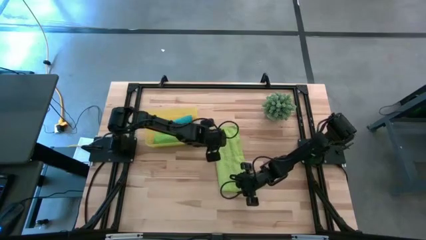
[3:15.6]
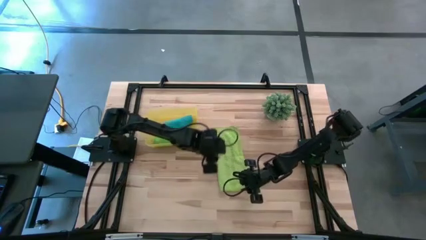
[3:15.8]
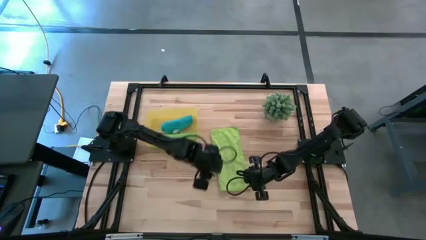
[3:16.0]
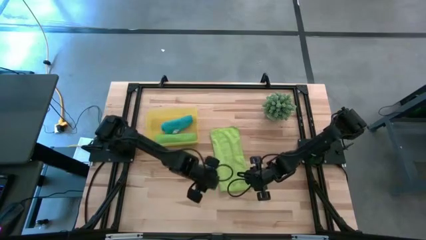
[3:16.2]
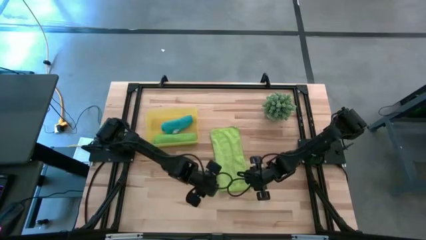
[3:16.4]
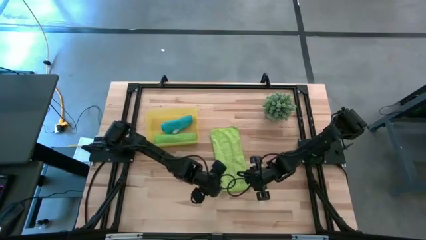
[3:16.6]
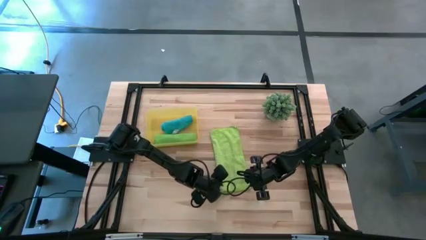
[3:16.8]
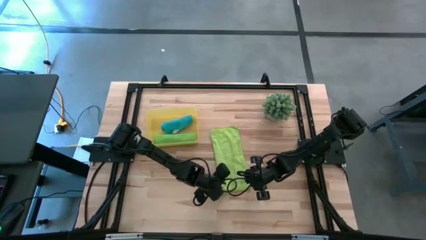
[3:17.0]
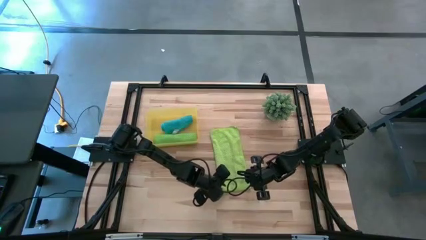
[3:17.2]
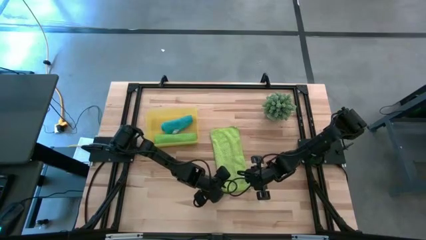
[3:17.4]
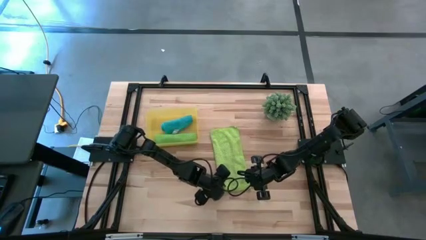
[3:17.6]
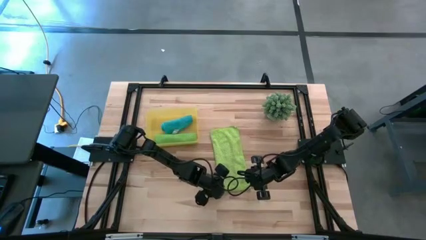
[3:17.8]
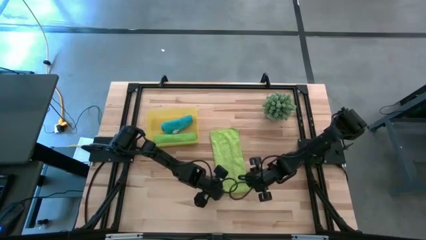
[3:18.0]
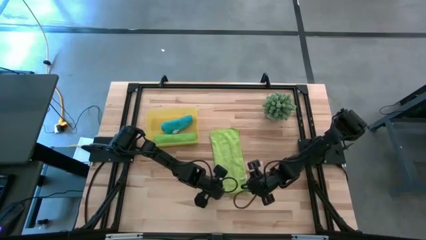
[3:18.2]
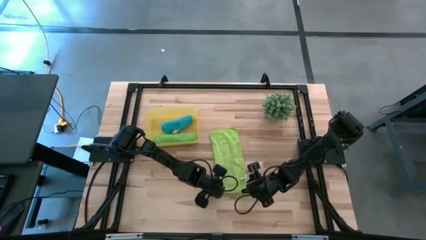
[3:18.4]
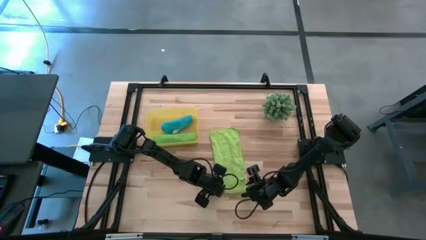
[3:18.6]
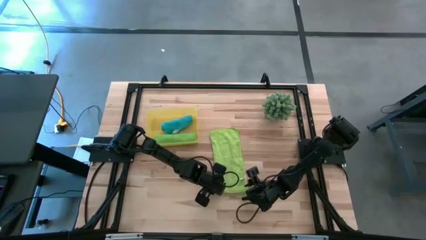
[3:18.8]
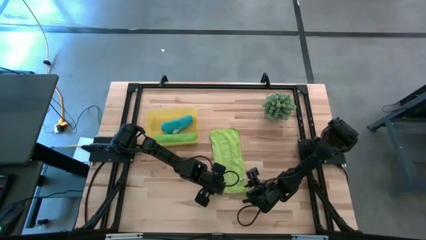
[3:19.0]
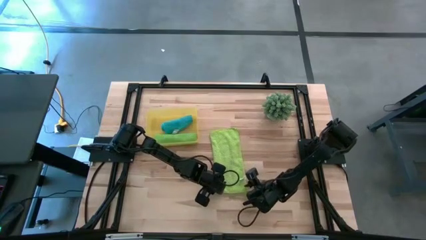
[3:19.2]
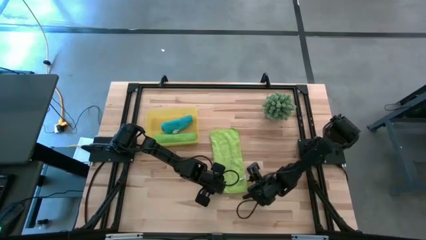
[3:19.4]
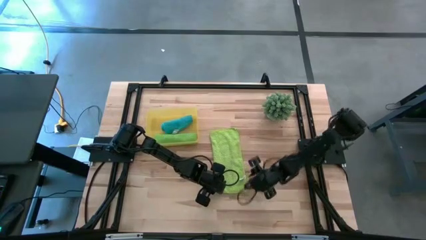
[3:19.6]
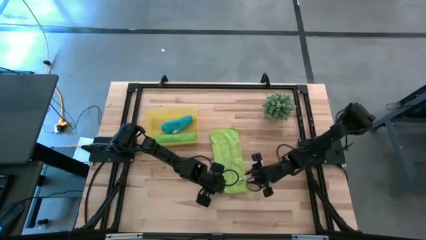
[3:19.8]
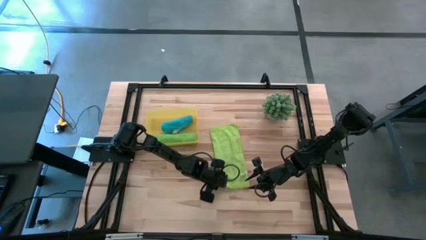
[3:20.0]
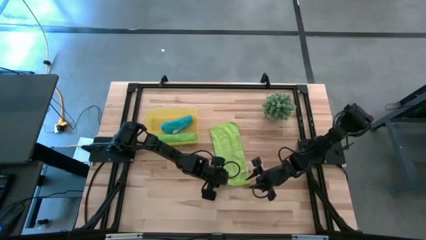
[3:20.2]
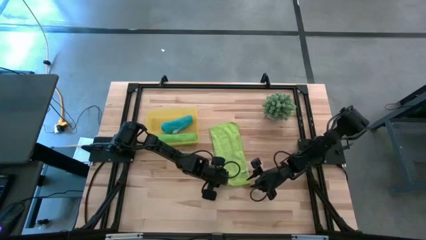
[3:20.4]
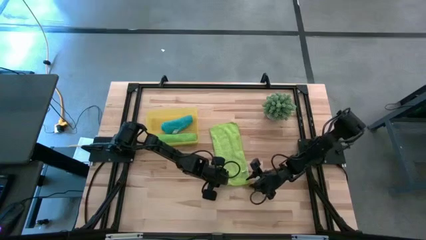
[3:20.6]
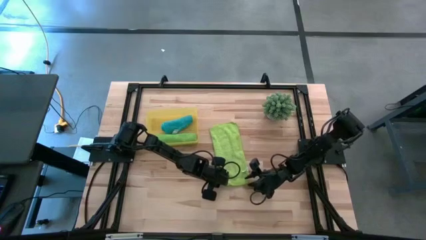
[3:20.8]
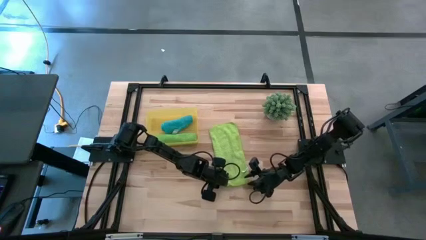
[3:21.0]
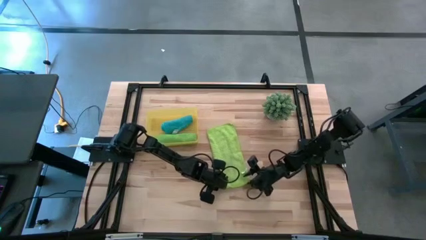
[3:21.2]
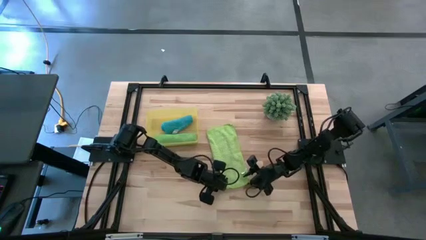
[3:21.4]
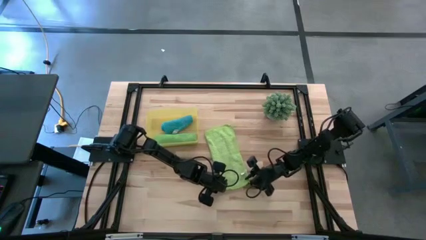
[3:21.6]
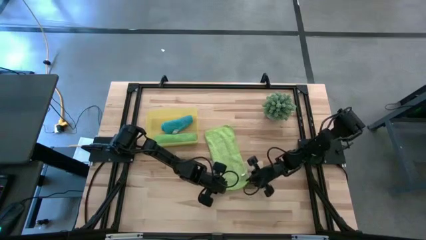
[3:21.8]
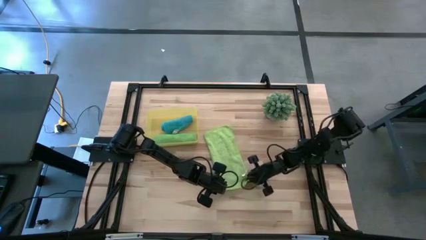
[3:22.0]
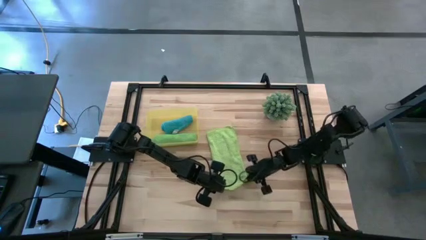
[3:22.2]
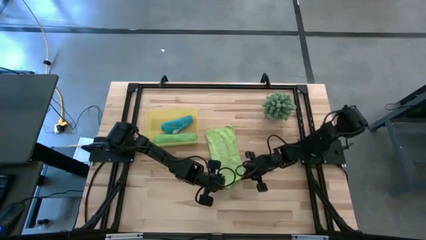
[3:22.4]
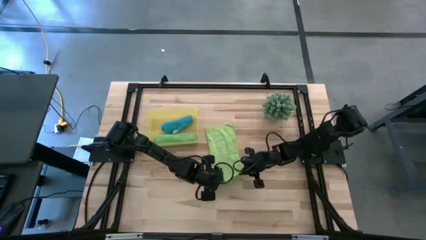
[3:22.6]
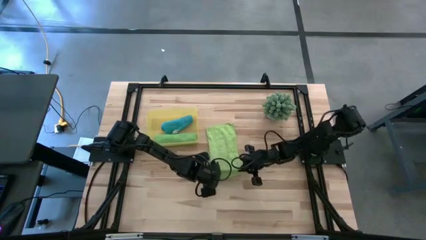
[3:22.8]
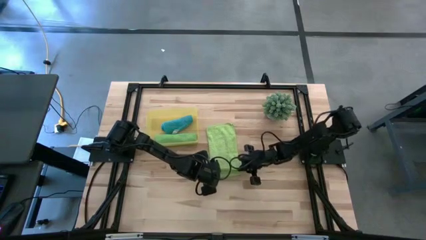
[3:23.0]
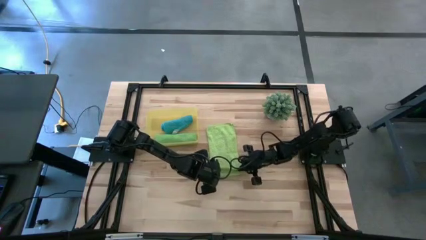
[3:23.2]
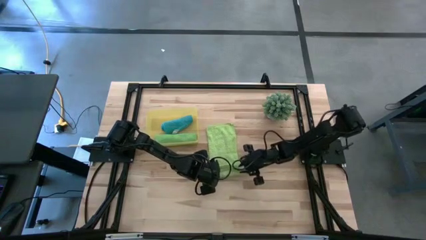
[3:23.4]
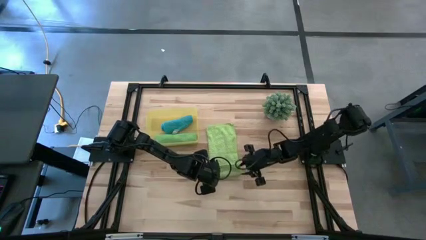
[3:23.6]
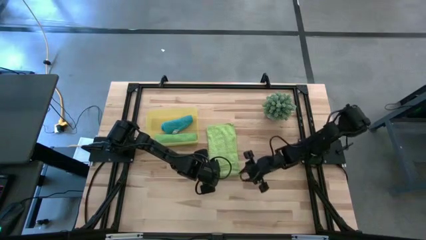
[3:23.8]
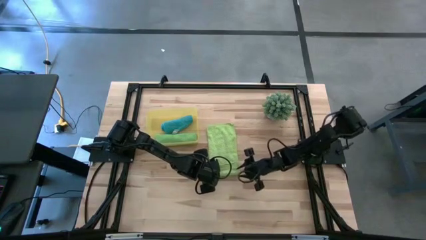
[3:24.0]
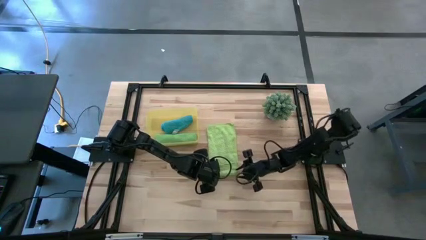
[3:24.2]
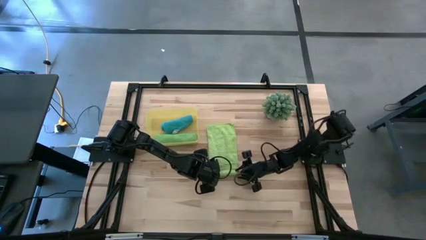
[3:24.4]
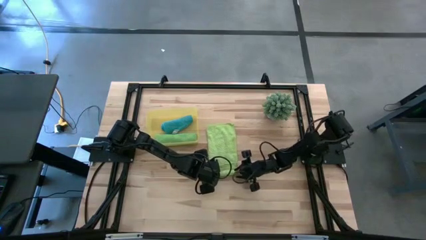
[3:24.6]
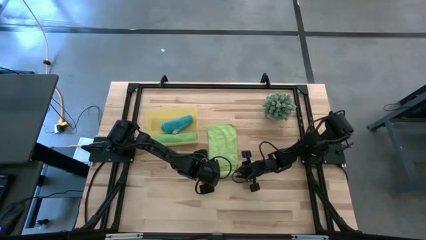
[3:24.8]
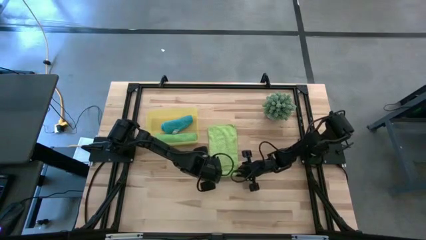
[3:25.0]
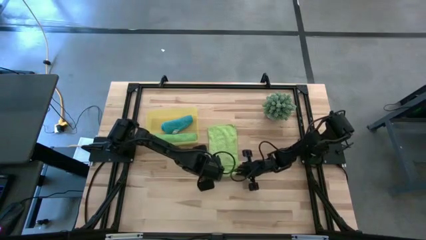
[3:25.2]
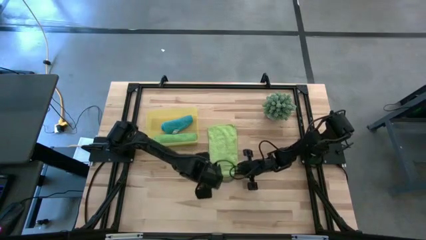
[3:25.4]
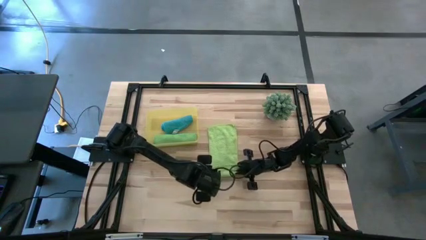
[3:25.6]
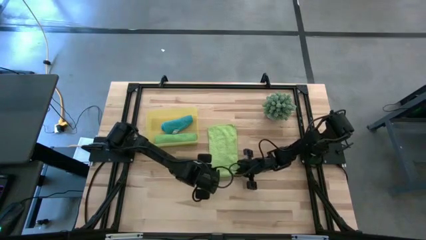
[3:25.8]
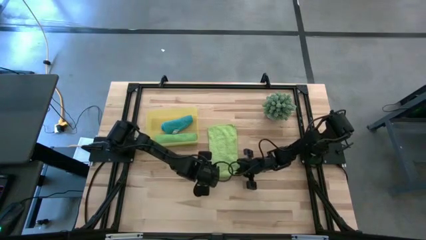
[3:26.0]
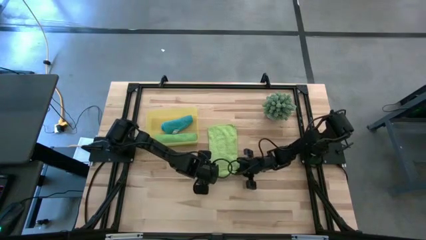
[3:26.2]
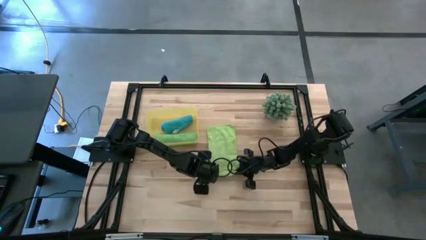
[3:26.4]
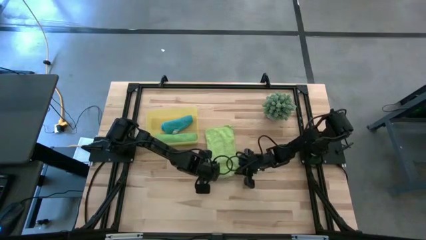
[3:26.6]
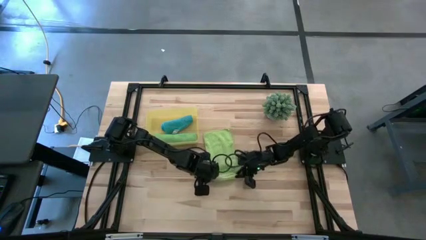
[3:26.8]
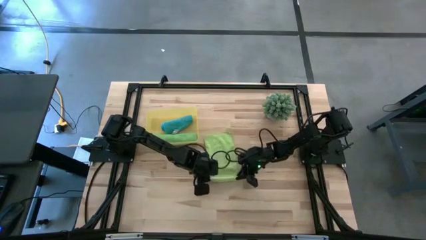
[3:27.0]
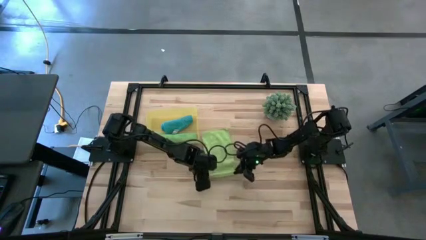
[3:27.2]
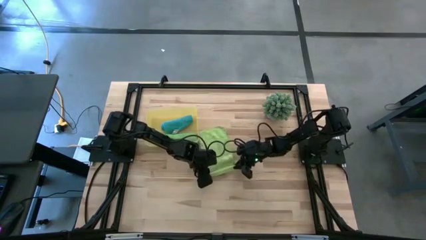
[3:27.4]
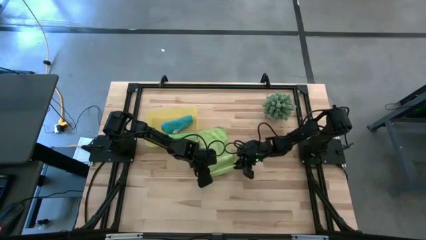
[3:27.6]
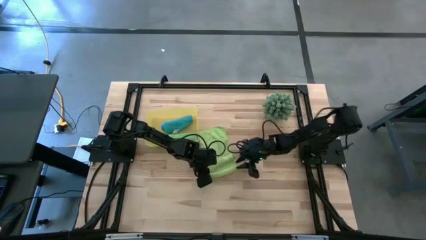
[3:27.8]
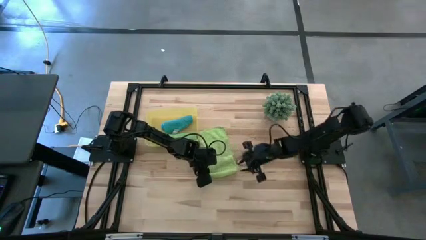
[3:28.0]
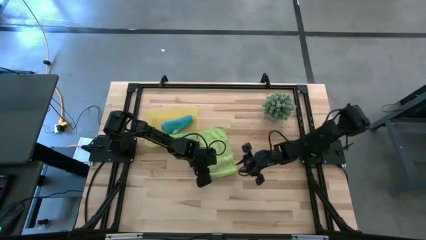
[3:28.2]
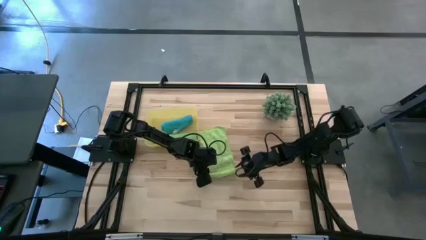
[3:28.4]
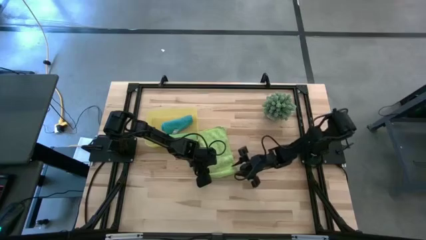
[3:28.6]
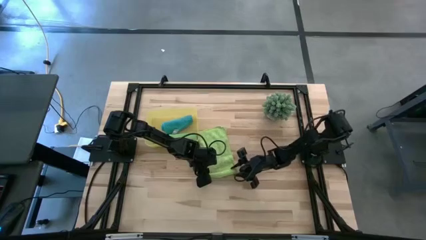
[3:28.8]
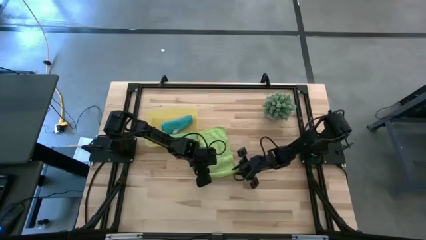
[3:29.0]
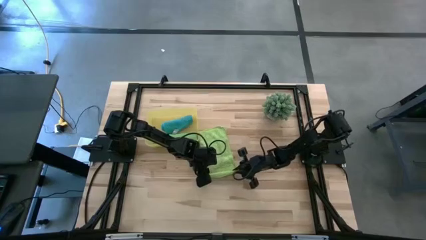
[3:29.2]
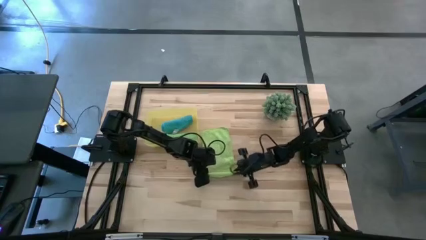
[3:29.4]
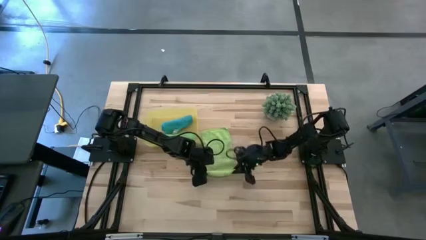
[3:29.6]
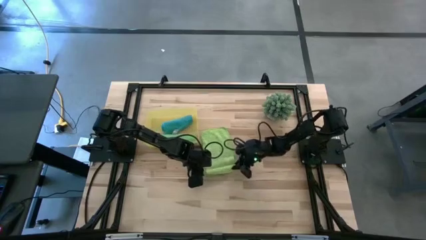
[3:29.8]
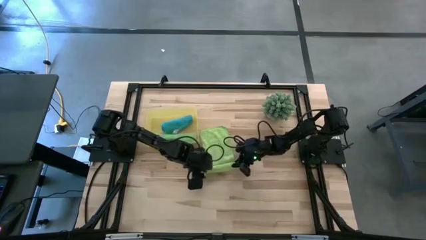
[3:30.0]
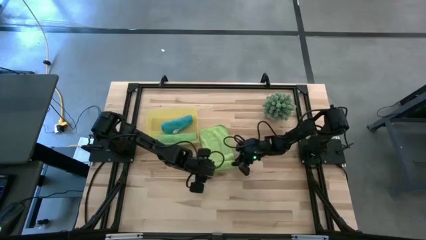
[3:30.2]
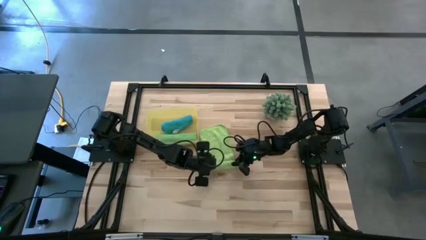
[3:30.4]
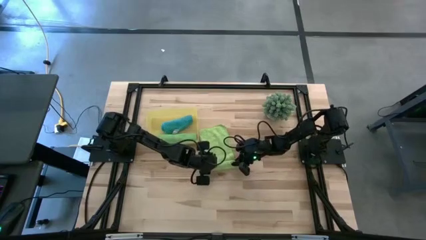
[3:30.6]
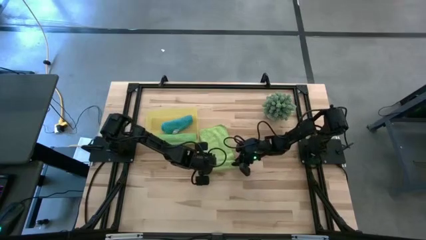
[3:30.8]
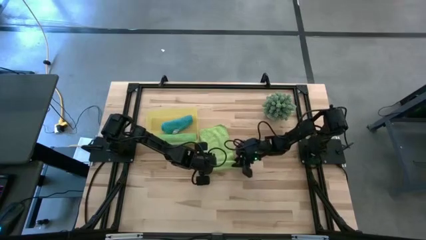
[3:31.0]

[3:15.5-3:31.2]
Task: Roll microfiber towels into tight, uniform cylinder then place into a basket
Roll the light green microfiber towel
